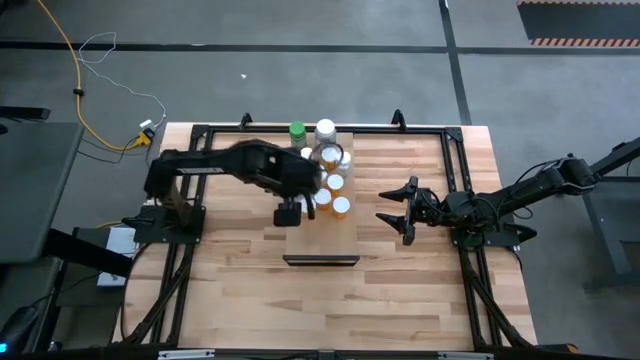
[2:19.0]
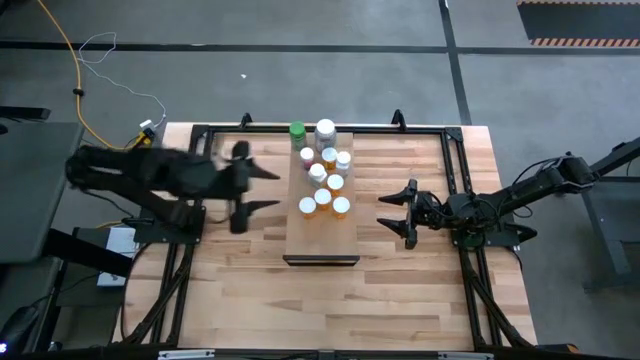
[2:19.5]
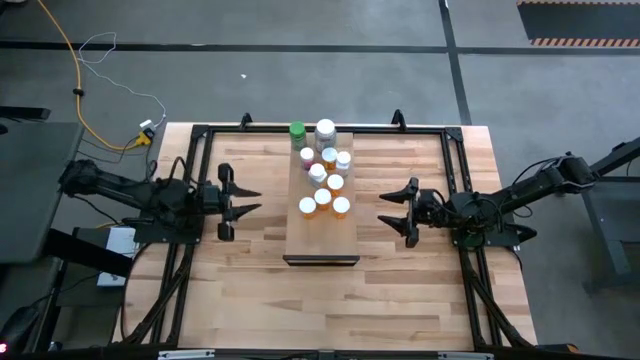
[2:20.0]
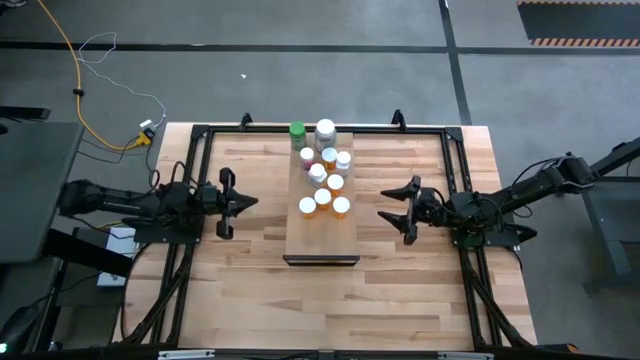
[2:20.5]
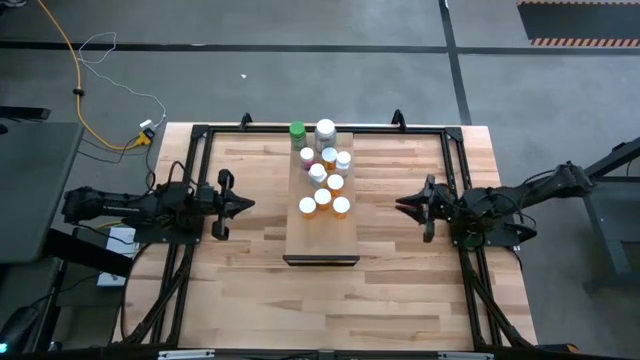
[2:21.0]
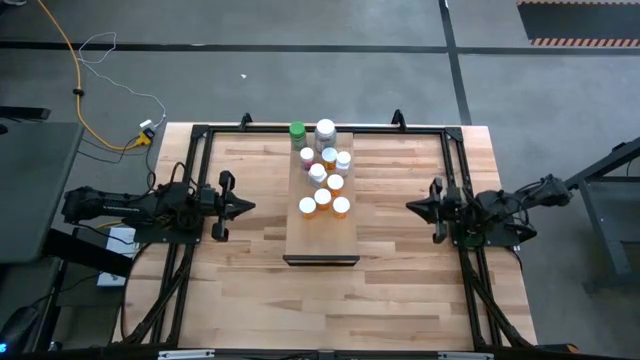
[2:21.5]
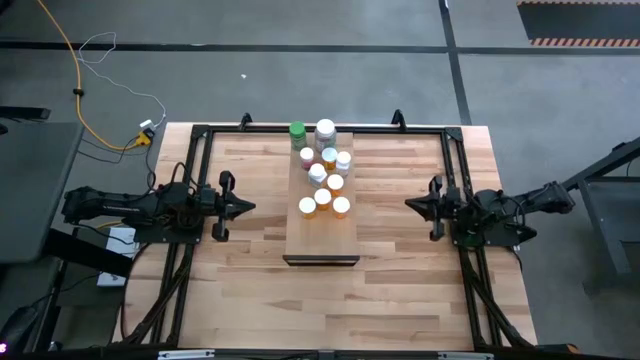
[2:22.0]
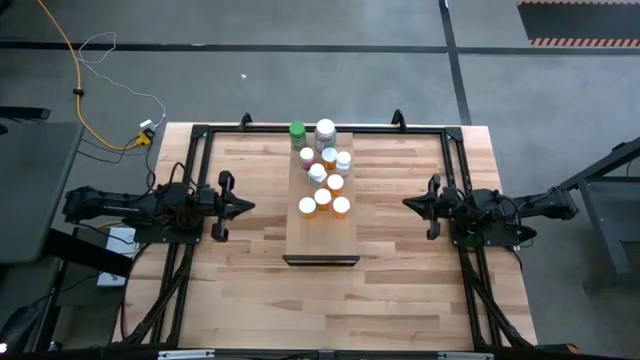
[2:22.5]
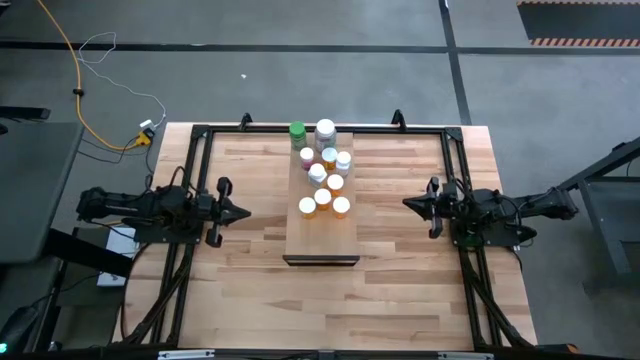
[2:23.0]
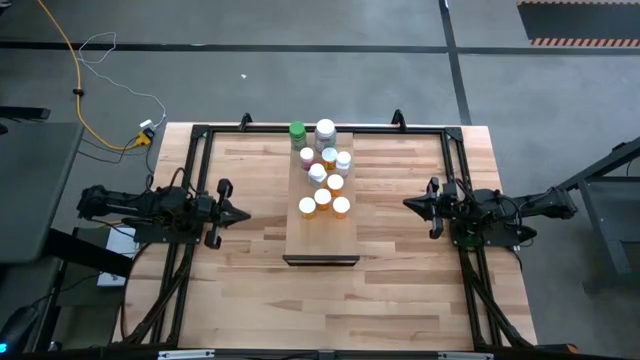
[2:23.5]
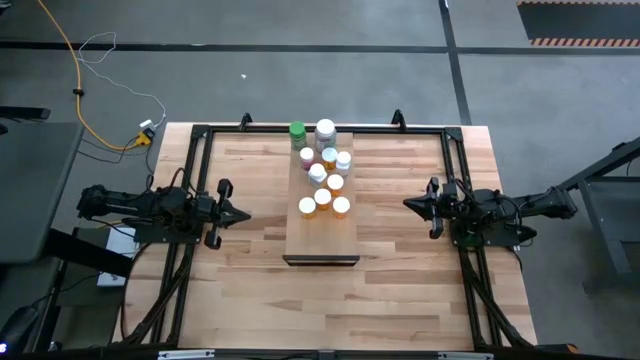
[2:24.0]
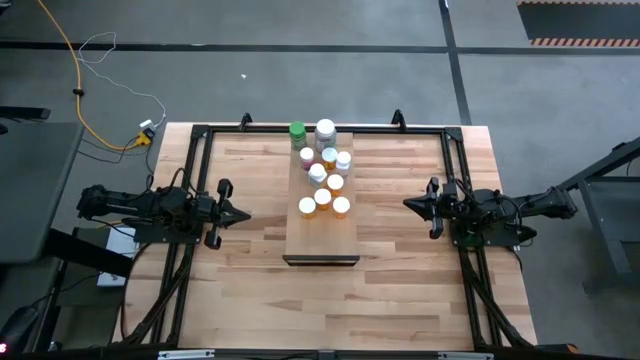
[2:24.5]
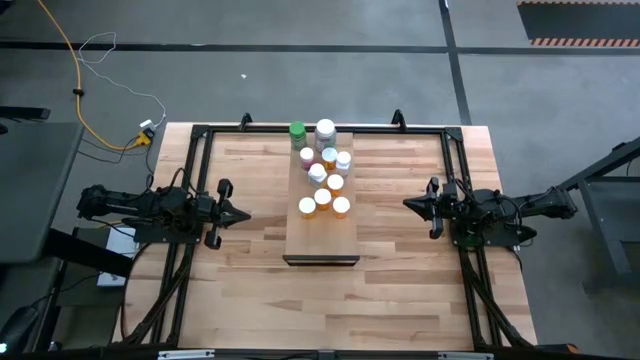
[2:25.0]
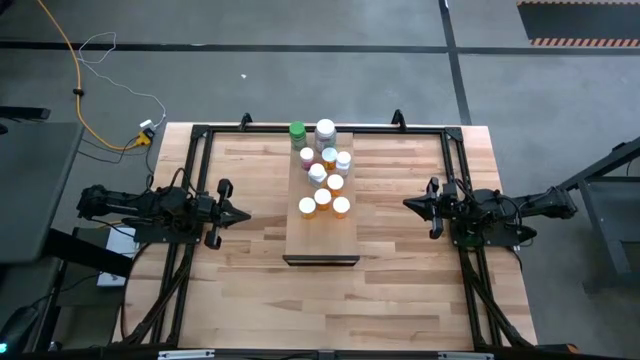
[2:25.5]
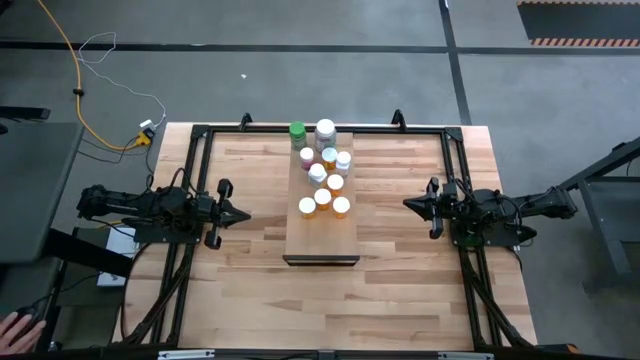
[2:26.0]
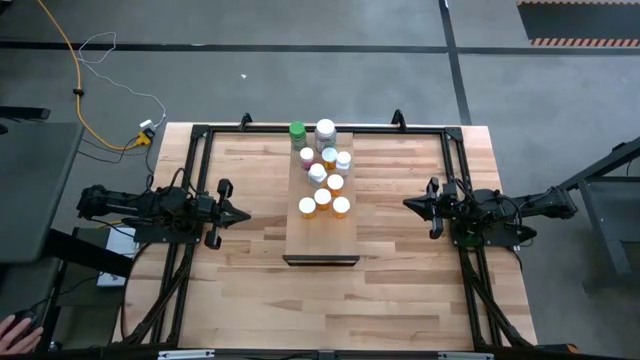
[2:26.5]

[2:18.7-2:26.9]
Task: Pick and place medicine bottles onto shelf by color
Return to Home Position

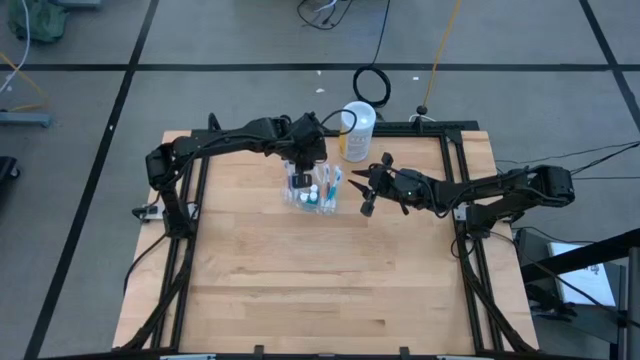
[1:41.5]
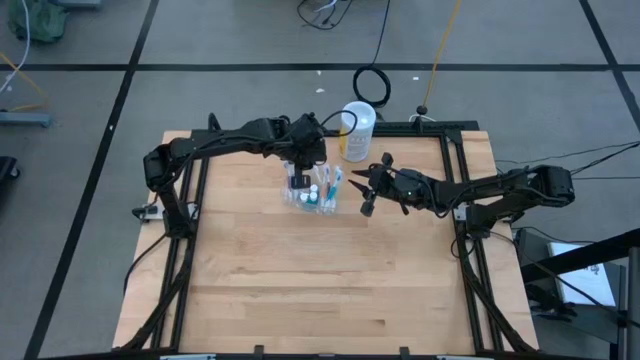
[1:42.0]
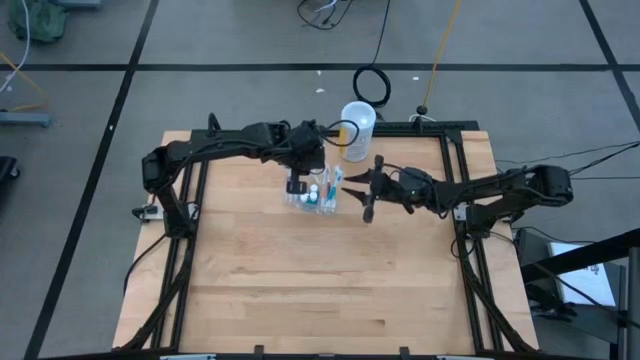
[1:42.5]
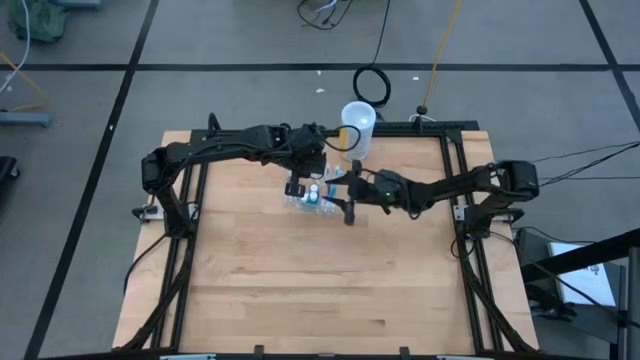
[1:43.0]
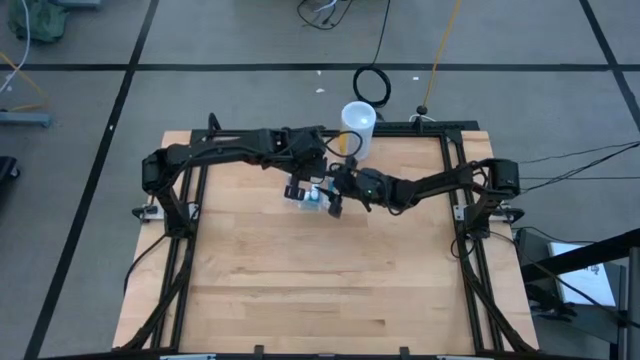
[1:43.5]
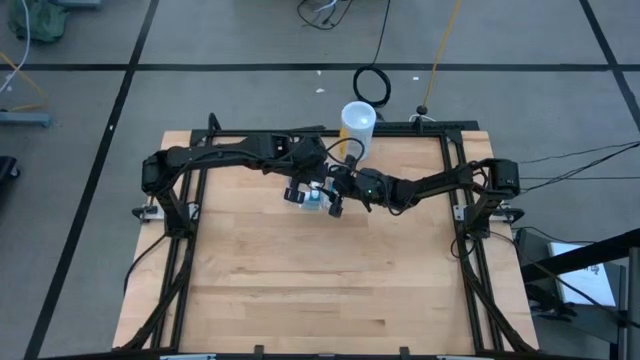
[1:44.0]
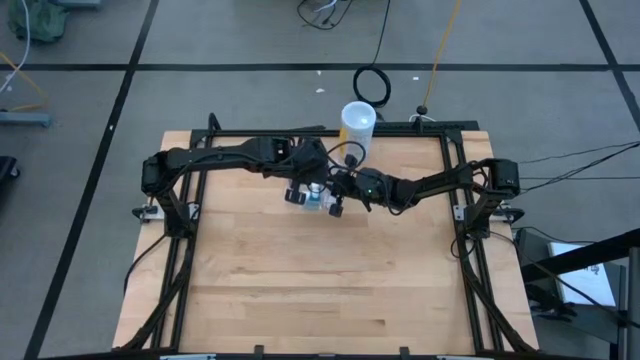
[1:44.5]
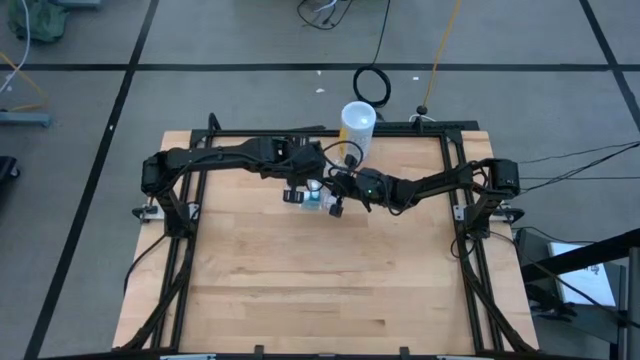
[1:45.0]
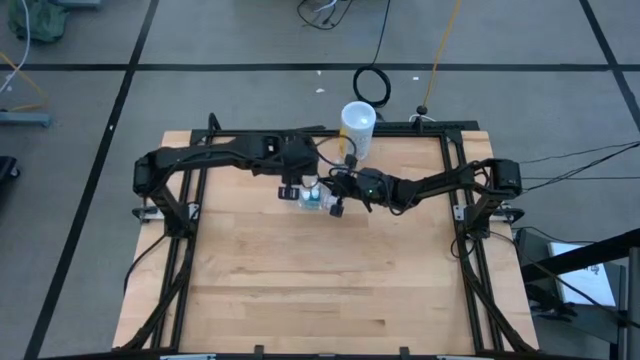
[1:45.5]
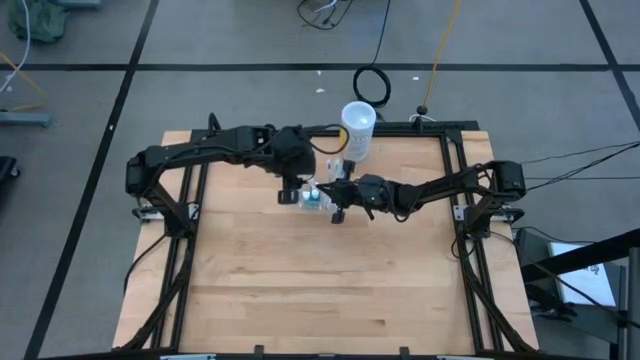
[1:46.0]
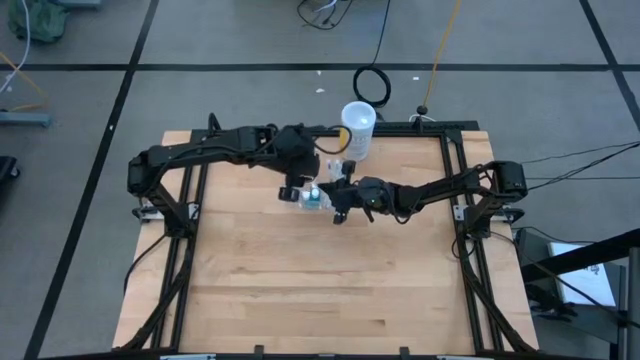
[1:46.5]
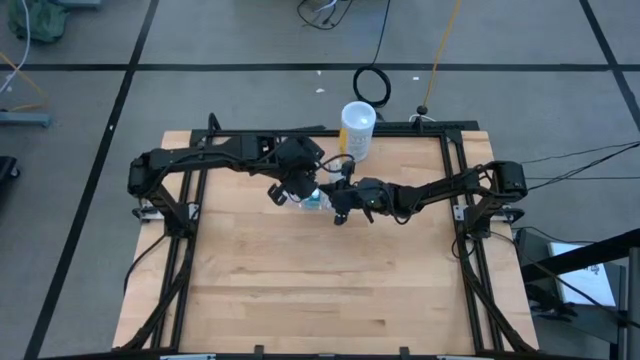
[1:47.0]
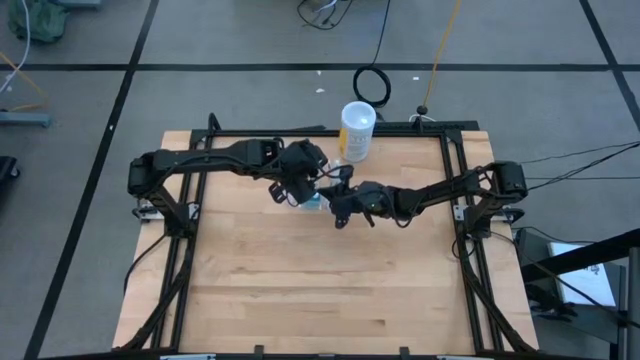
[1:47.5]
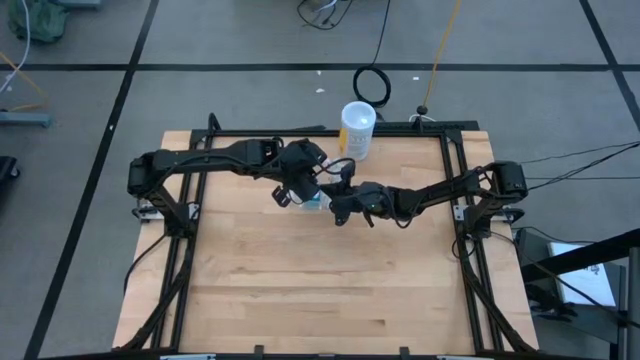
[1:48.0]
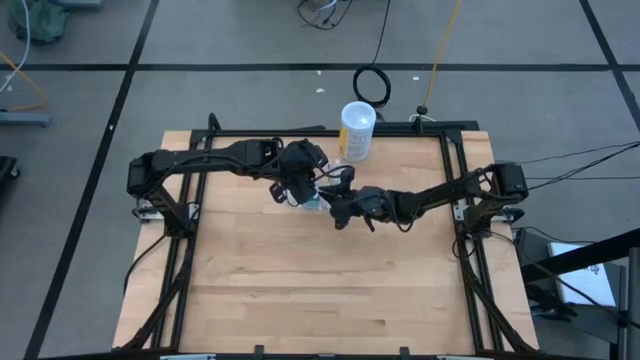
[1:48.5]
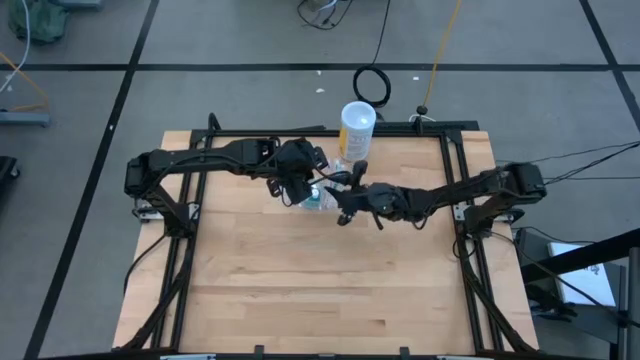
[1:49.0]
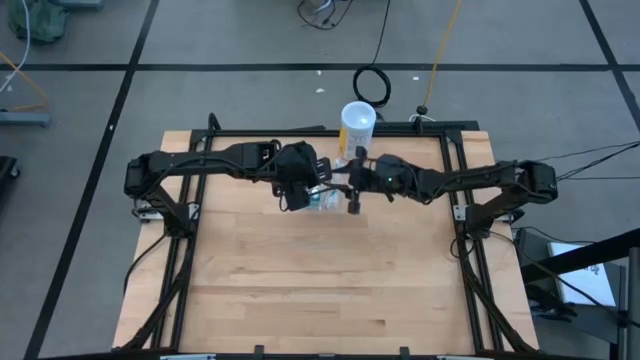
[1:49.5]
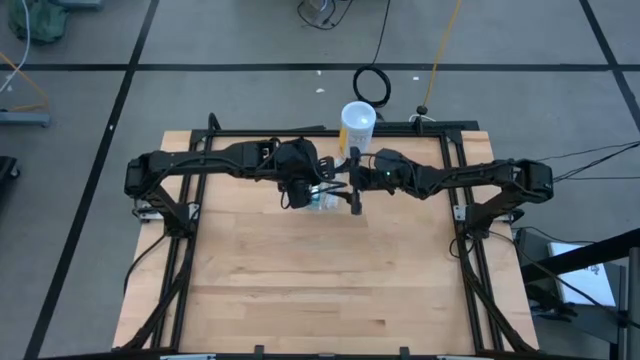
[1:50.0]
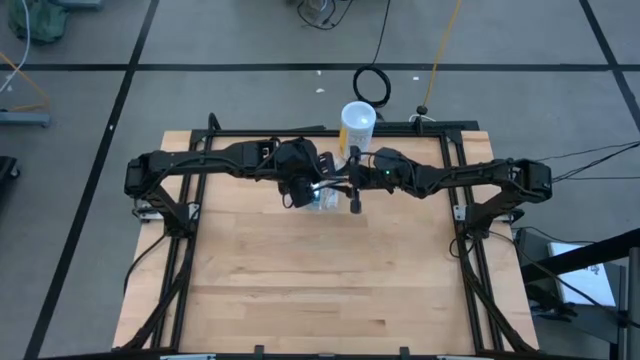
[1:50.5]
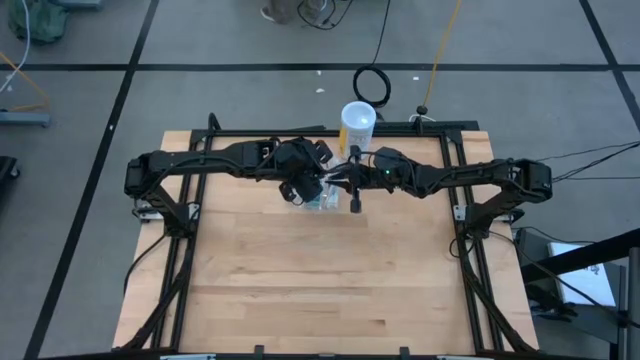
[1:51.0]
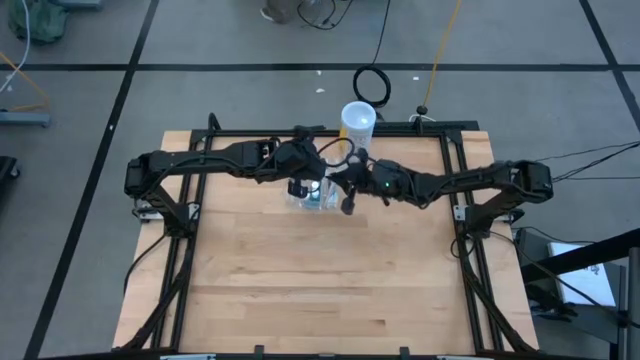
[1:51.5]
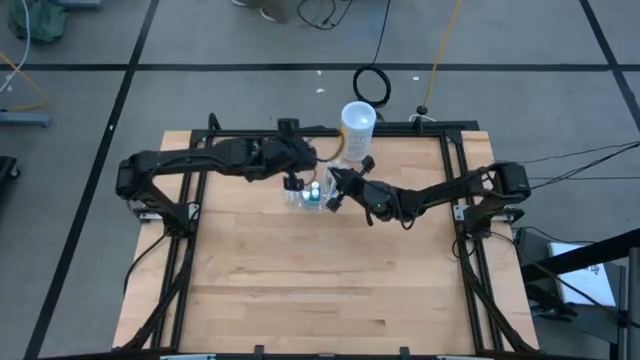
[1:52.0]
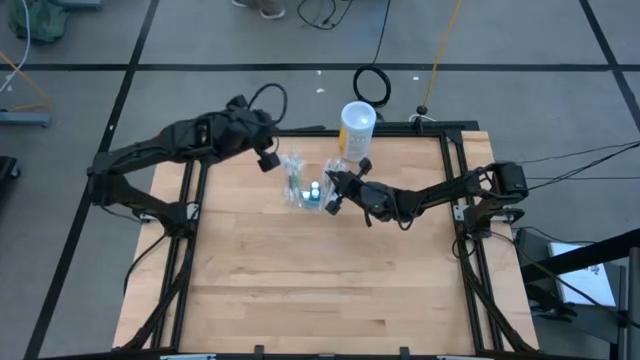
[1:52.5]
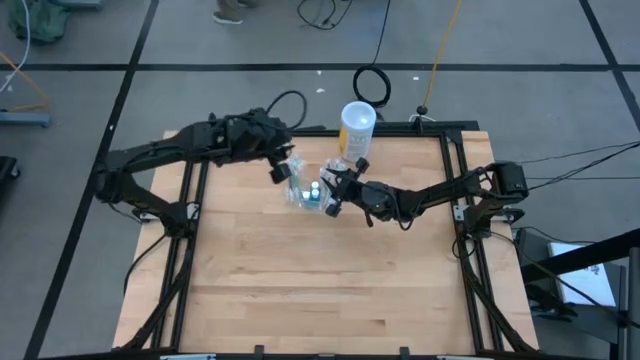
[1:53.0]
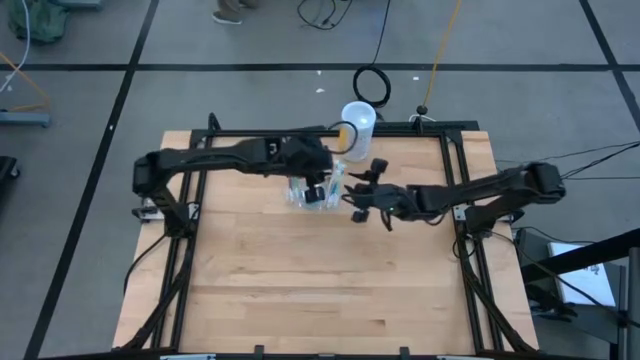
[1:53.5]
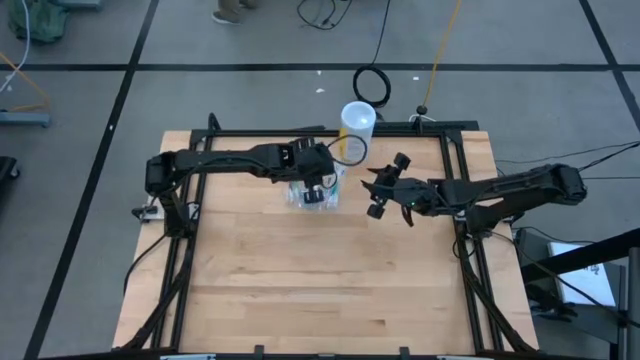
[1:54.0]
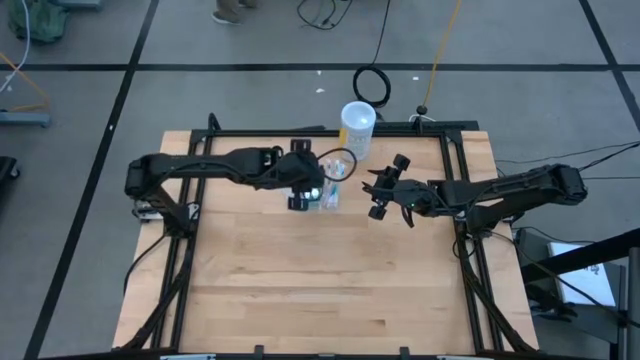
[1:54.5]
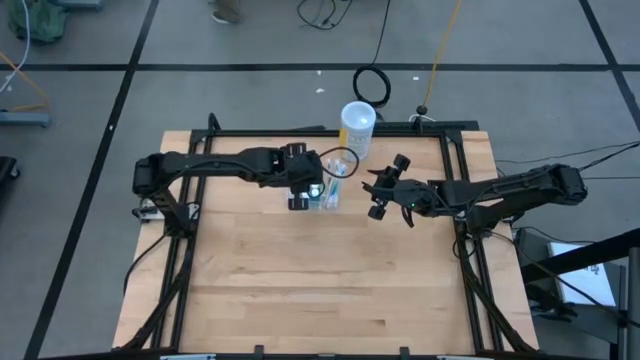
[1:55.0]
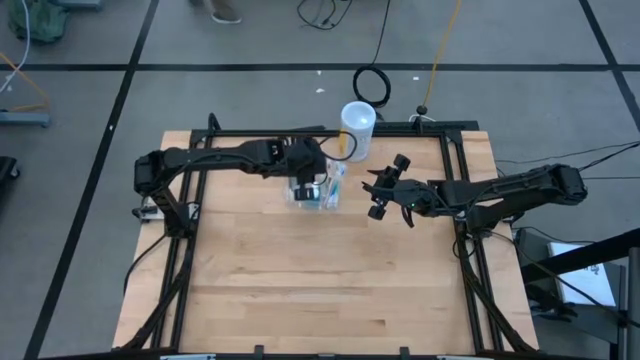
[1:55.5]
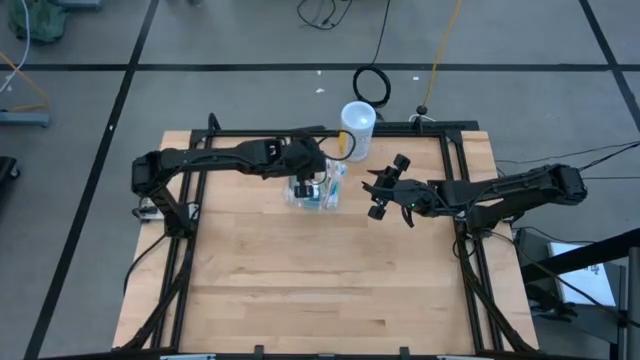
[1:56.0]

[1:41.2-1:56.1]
Task: Pick & Place toothbrushing station
Adjust the toothbrushes into the transparent organizer
